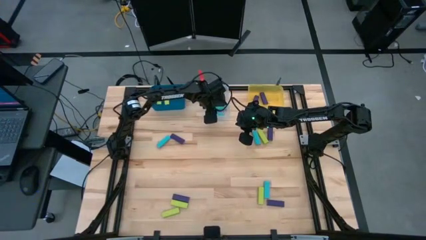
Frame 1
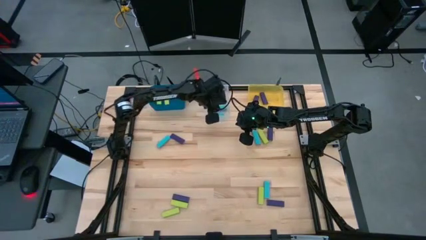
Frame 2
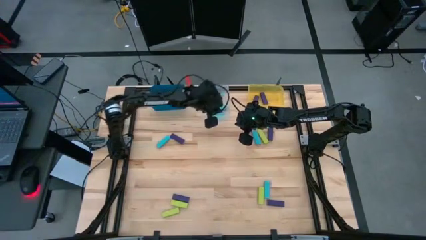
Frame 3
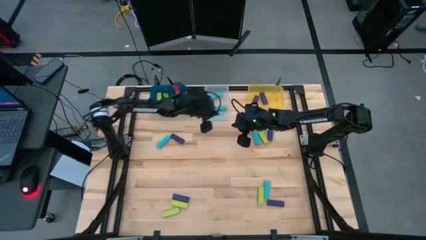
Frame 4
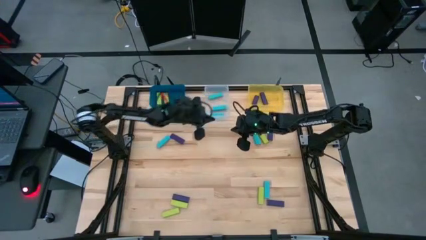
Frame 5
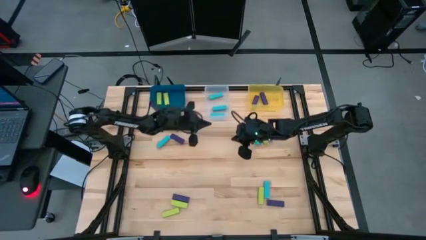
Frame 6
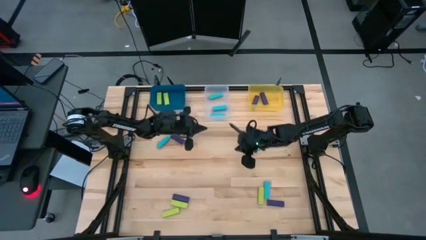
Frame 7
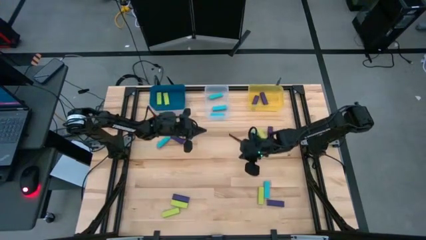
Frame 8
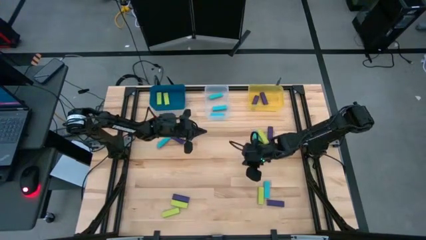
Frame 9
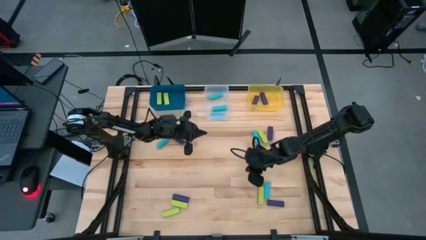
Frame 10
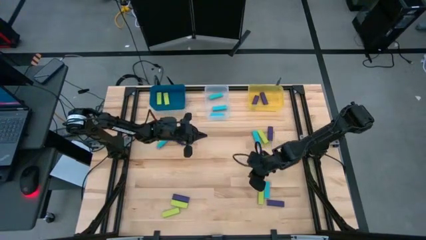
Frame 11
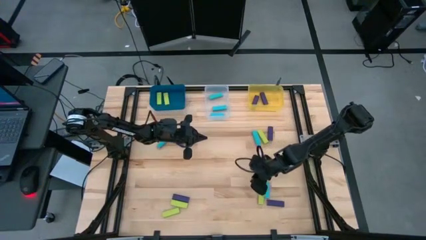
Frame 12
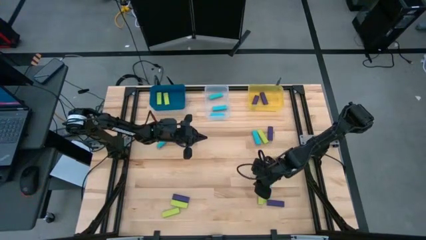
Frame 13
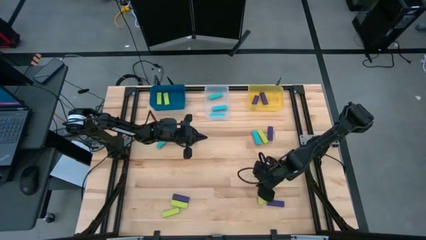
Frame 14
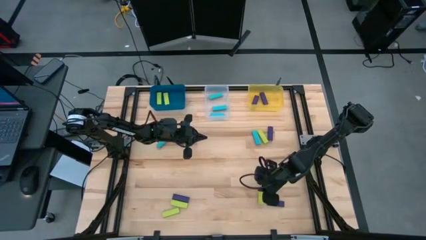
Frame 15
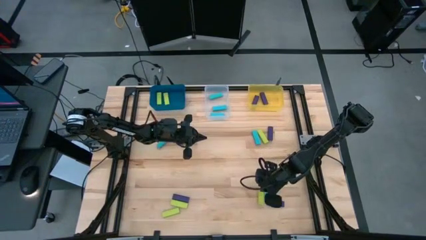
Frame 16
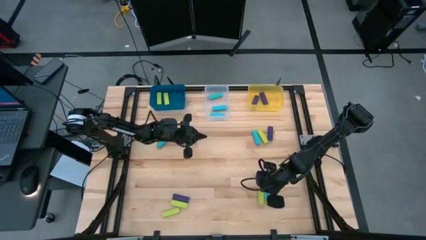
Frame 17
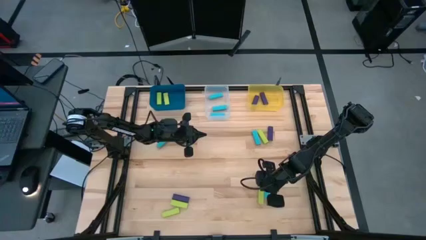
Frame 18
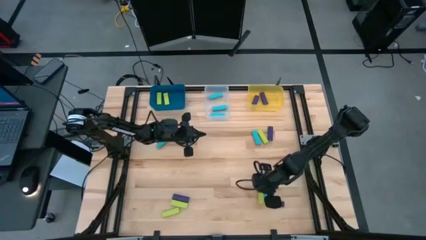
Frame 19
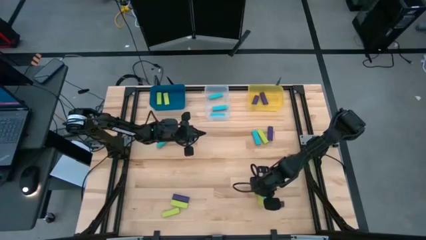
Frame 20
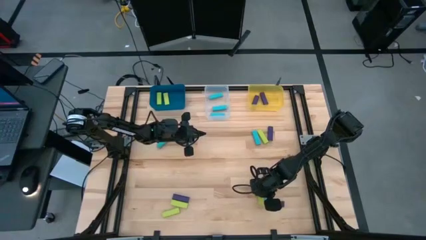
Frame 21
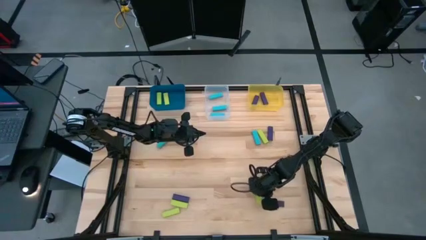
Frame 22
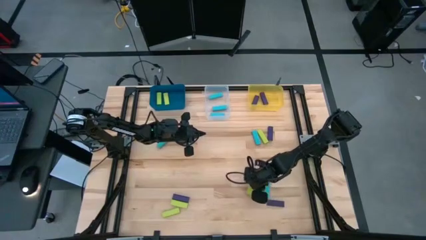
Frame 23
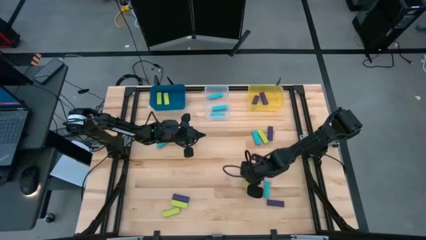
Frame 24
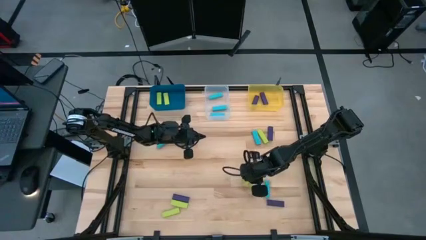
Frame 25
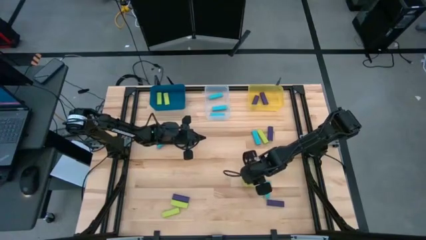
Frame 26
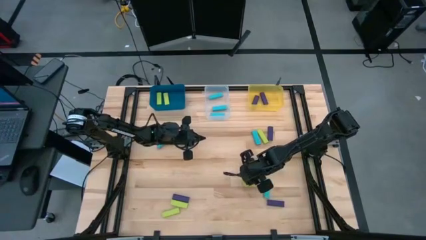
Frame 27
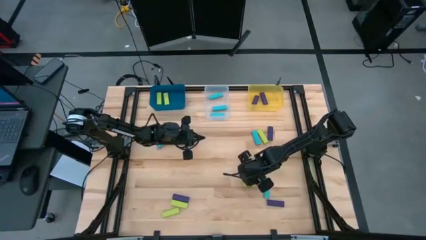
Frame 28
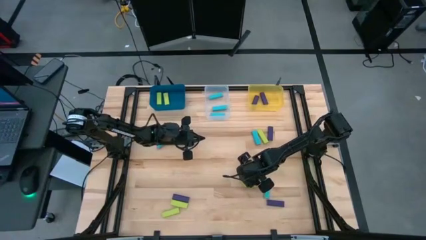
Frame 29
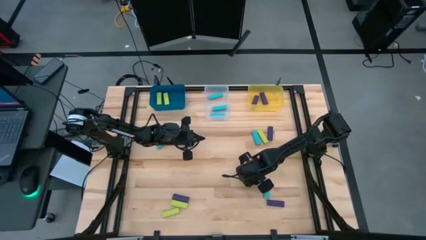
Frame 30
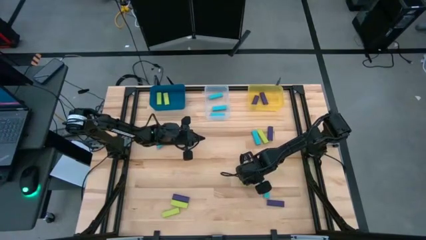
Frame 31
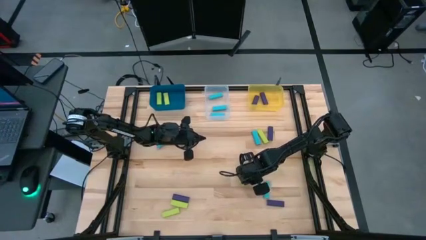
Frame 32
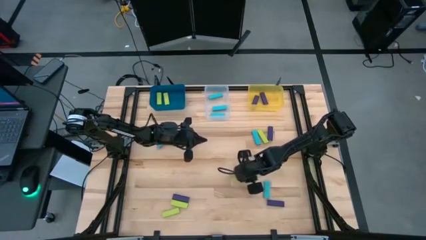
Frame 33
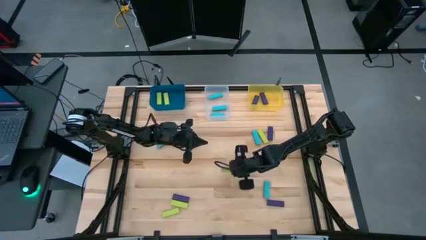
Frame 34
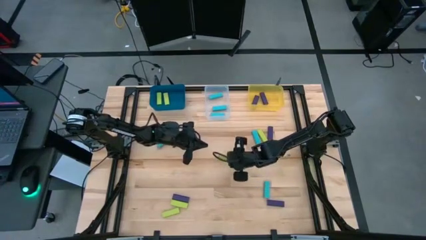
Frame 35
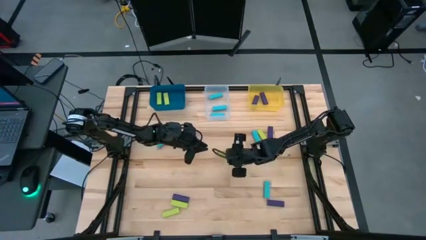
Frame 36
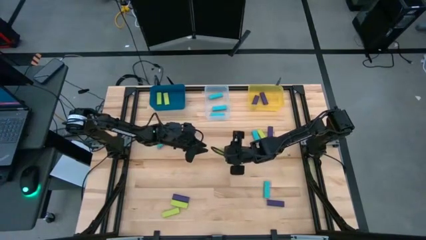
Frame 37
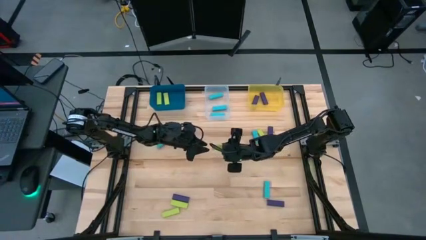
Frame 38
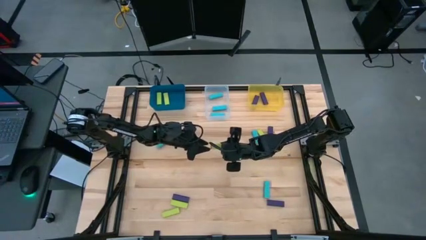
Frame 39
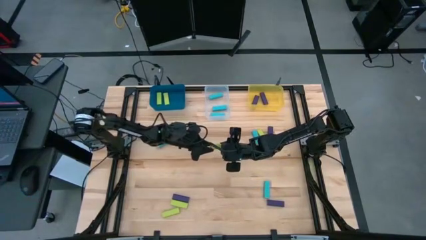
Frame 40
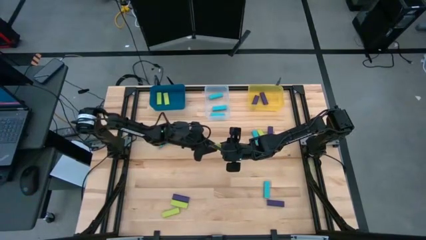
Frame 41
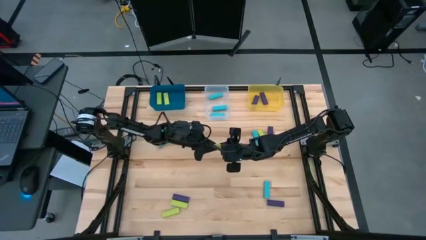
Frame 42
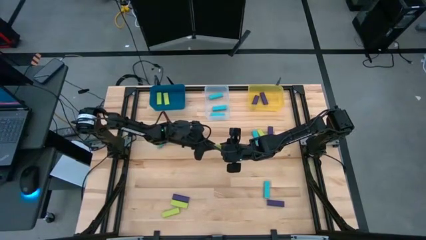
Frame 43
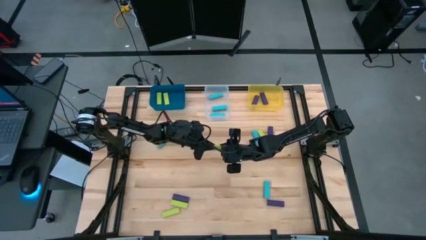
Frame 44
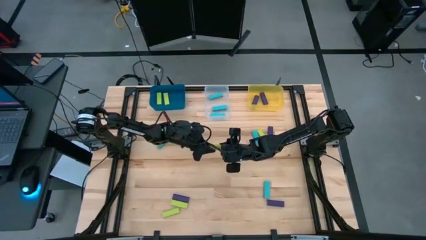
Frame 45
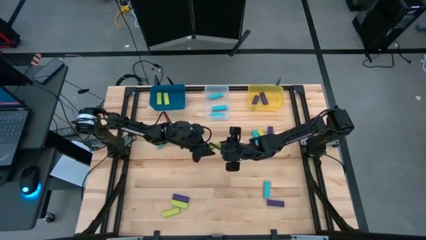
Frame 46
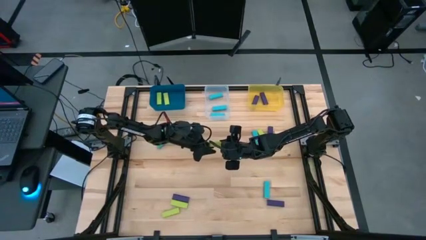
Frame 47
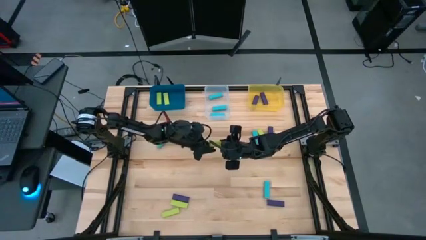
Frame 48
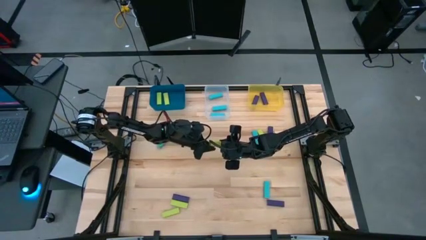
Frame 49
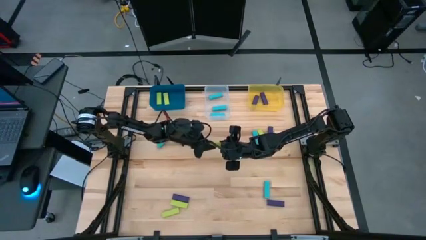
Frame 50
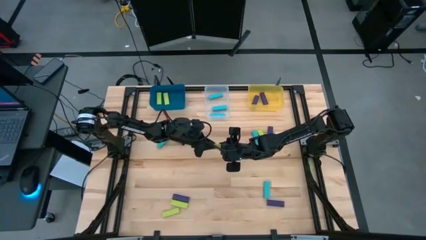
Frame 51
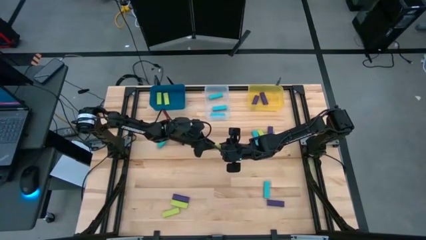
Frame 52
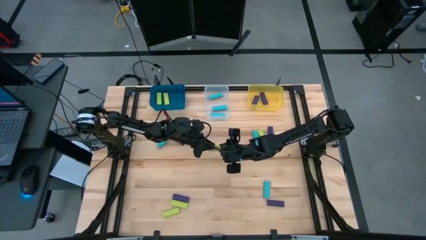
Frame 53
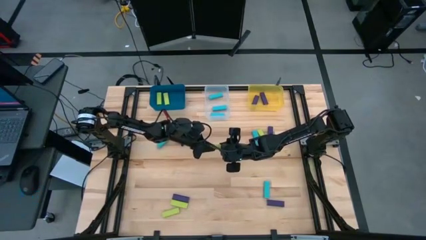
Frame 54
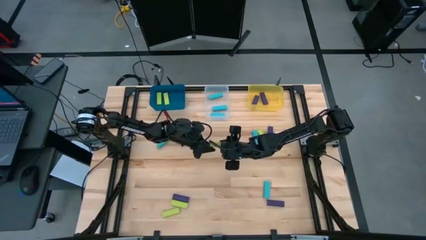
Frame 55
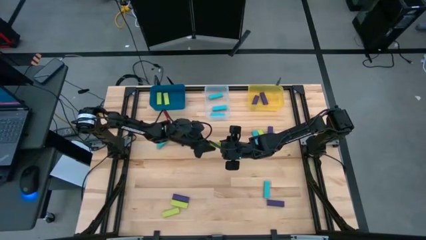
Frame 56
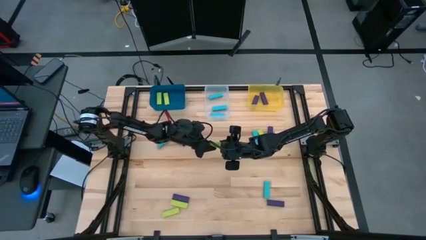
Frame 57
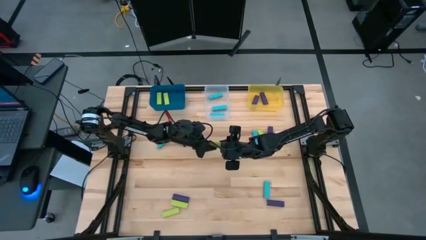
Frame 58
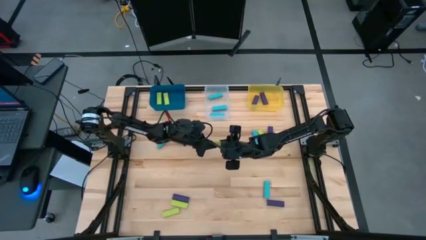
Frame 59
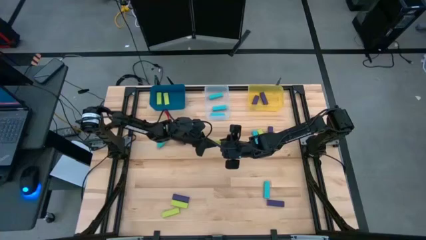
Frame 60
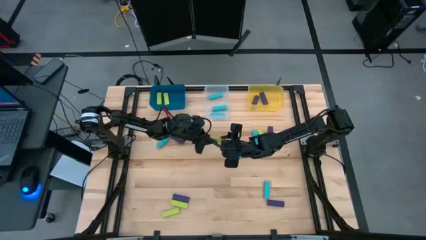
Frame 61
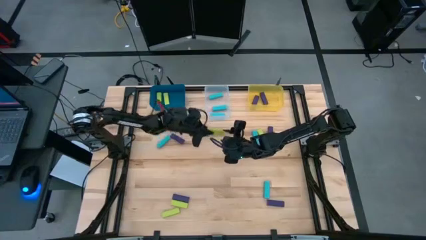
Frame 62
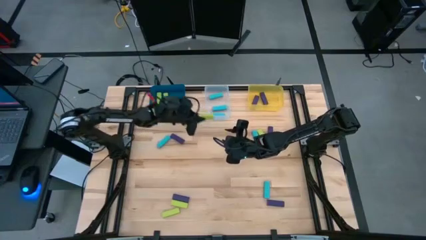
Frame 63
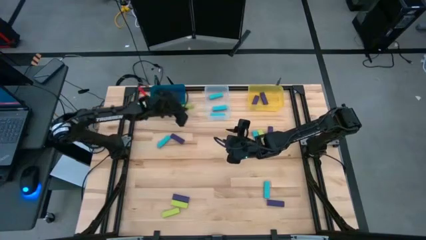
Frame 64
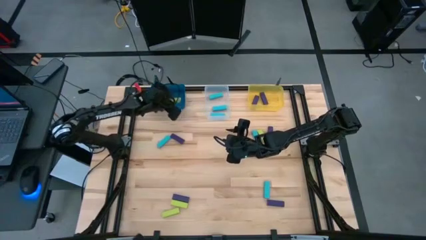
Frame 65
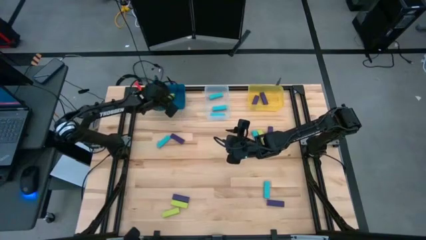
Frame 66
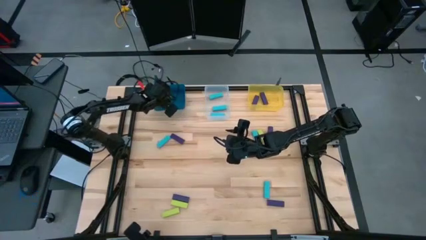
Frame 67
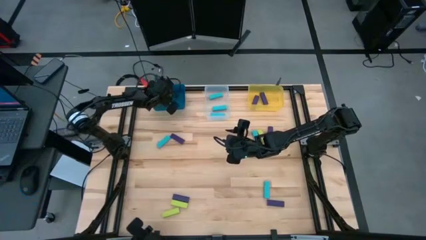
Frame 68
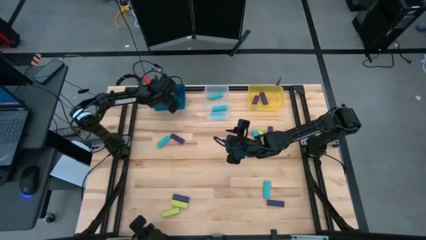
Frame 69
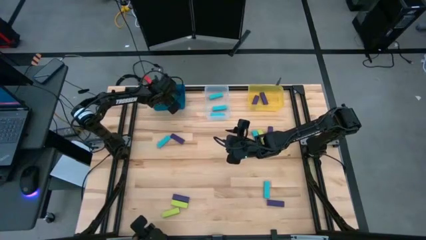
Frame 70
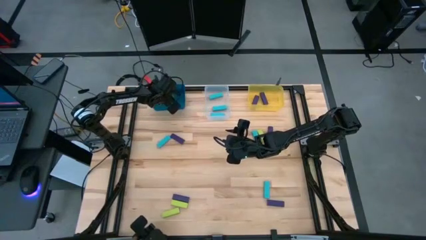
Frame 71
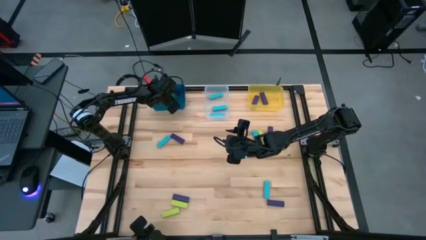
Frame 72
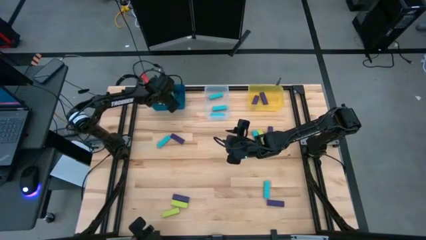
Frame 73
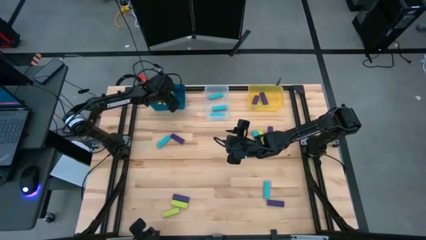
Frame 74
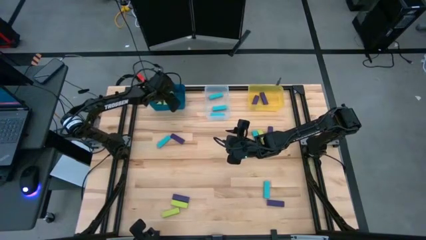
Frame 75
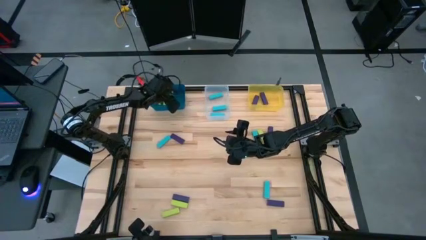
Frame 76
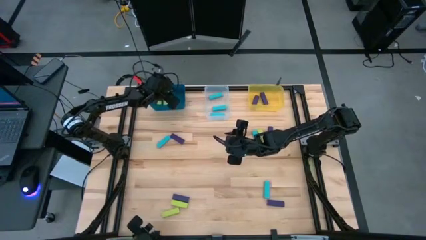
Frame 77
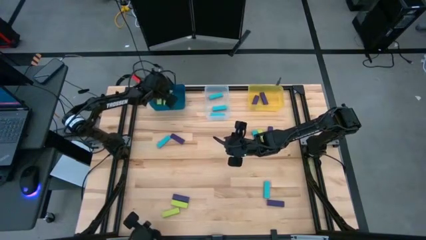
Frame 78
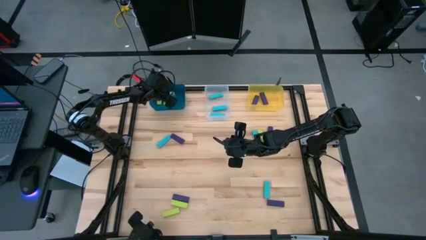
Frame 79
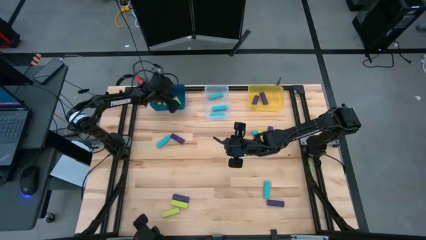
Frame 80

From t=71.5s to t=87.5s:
Task: Sort blocks
Put the green block into the blue bin
